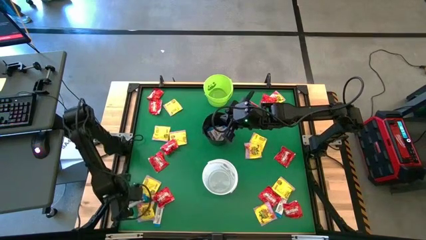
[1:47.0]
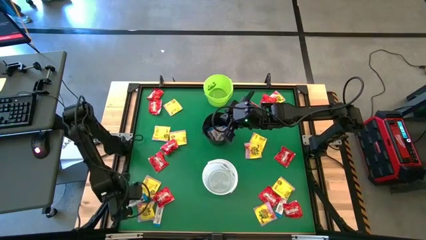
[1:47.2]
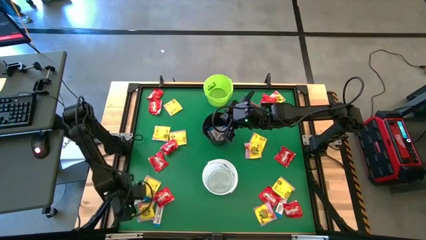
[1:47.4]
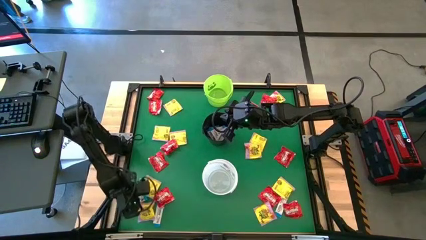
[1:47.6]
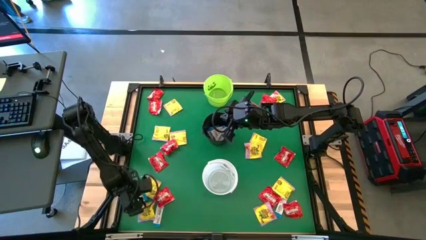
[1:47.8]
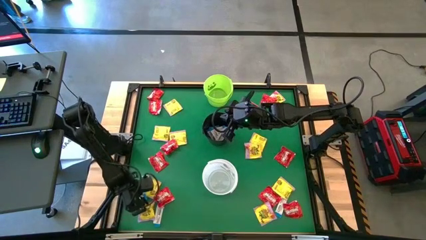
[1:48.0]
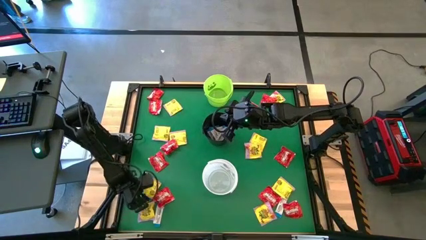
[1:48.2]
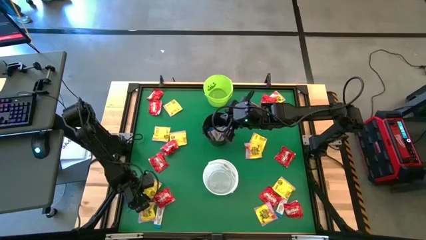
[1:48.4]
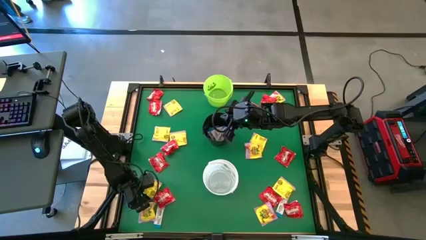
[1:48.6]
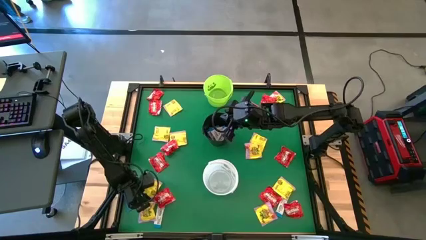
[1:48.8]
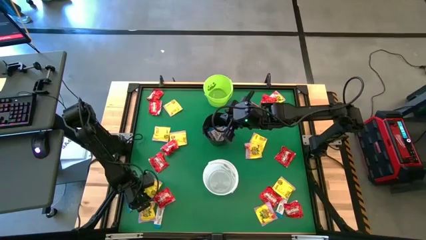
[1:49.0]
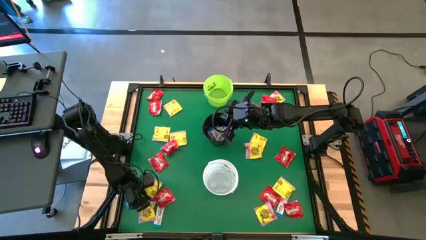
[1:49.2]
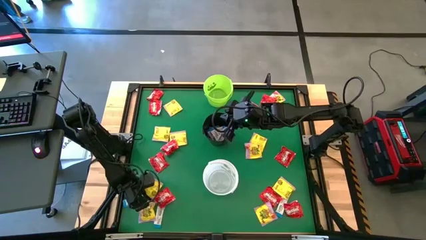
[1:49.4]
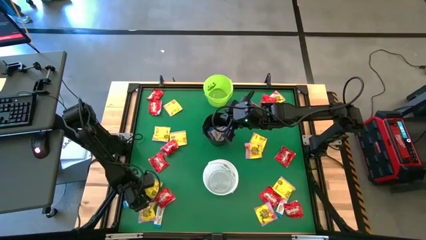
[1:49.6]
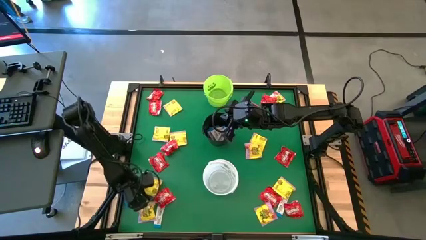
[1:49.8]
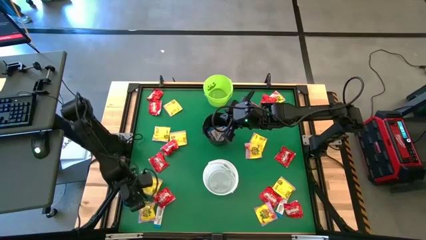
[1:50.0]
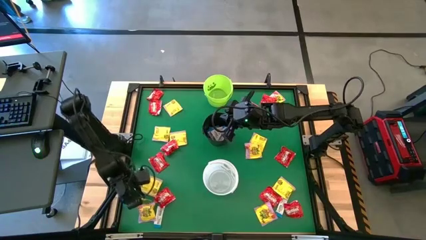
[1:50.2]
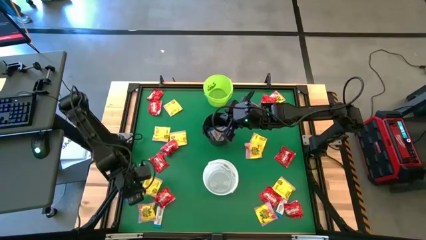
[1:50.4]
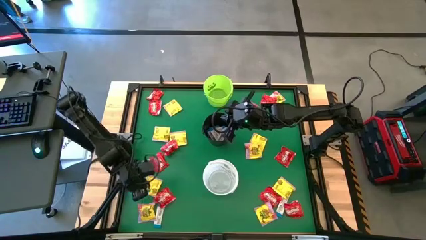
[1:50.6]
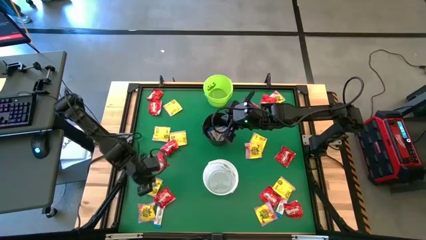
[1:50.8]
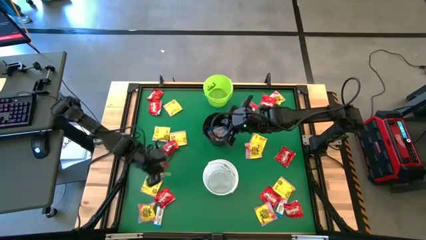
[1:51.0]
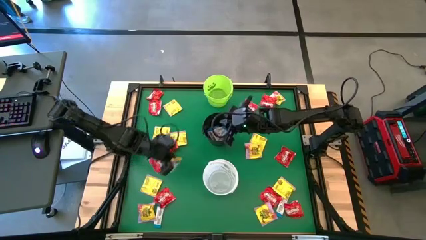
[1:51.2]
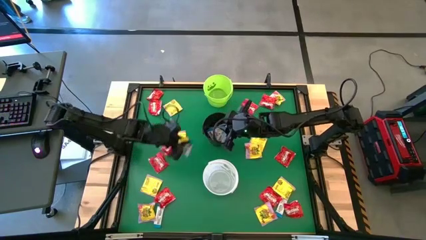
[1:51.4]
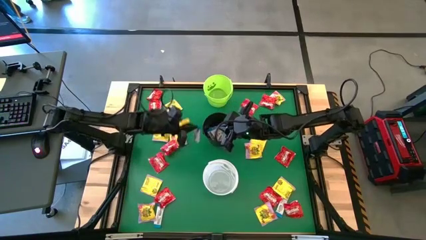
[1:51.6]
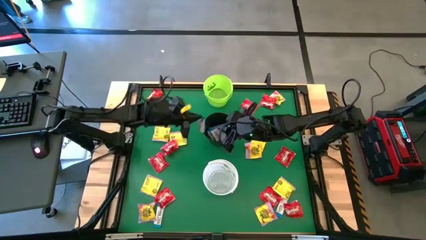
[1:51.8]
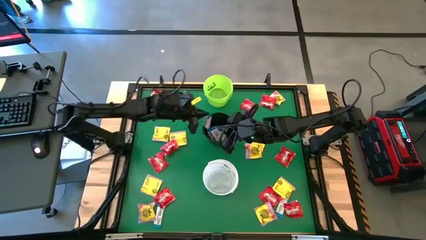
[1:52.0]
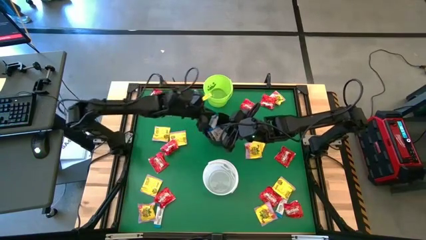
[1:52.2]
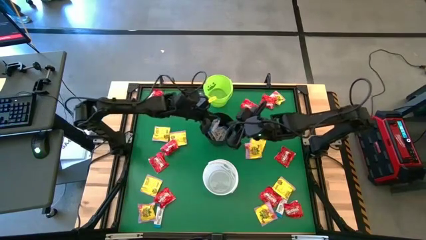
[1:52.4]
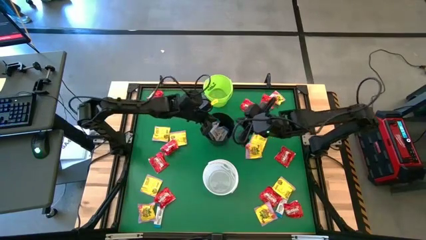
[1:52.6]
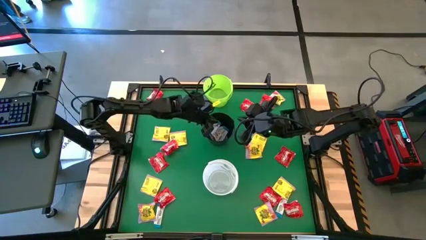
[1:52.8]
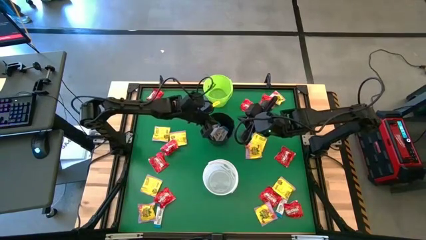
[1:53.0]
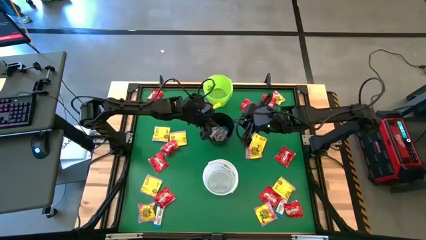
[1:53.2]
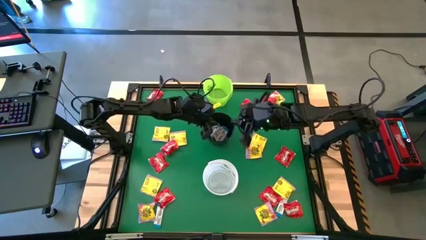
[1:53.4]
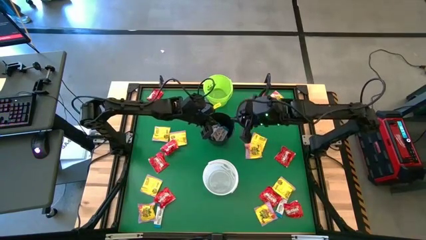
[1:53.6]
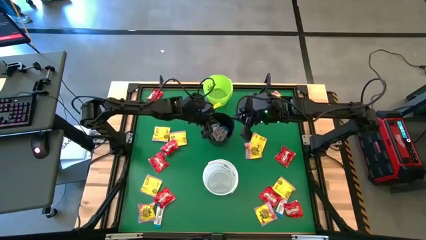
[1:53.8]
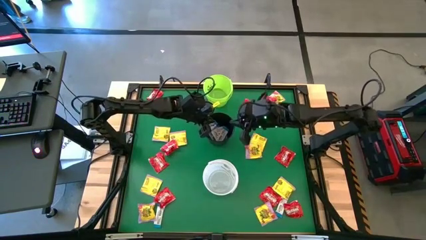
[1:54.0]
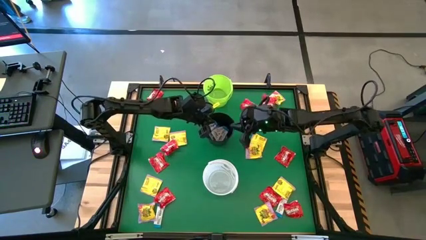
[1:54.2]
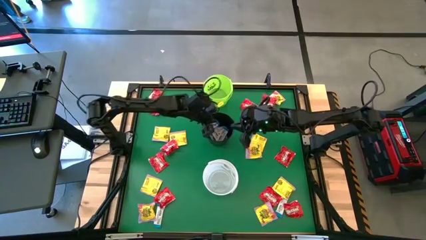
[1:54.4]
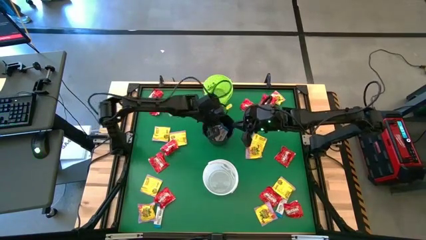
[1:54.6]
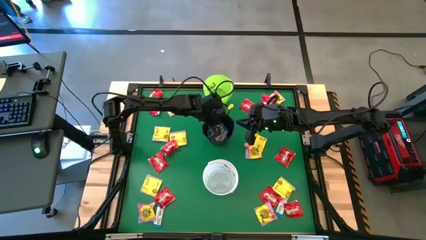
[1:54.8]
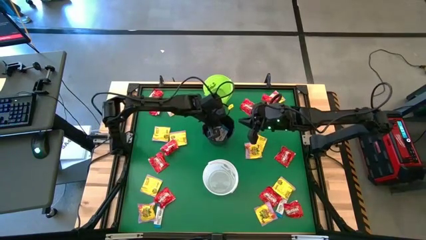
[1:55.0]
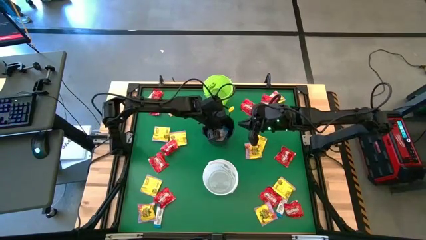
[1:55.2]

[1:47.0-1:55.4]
Task: Sort candy by brand, put in halloween buckets
Put the white chocolate into the black bucket

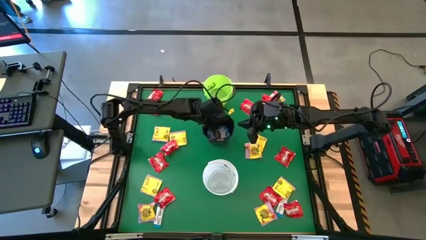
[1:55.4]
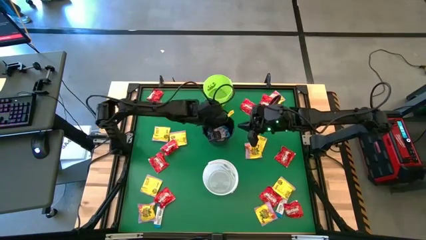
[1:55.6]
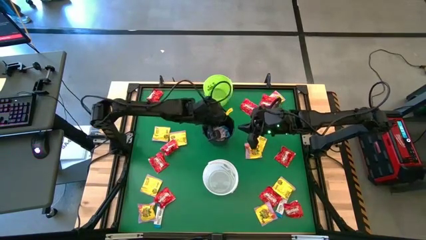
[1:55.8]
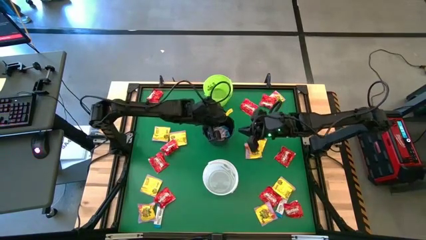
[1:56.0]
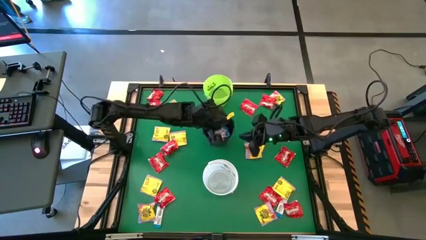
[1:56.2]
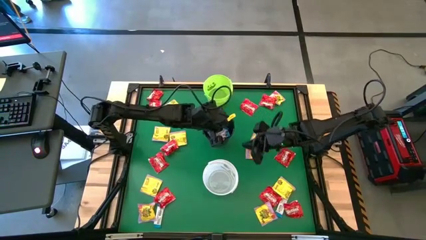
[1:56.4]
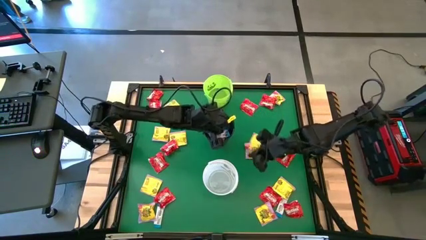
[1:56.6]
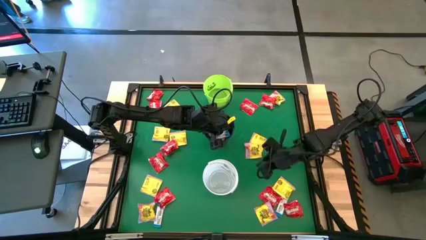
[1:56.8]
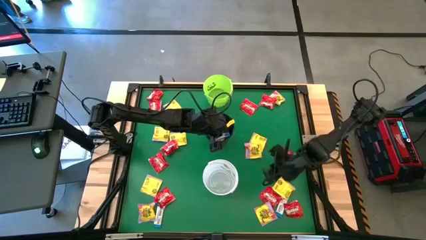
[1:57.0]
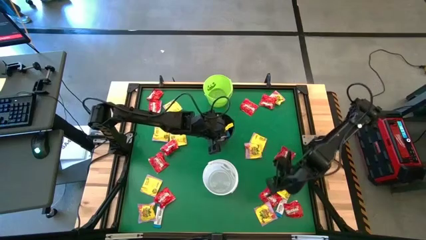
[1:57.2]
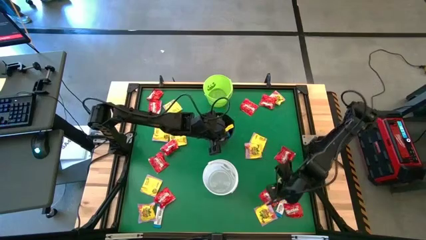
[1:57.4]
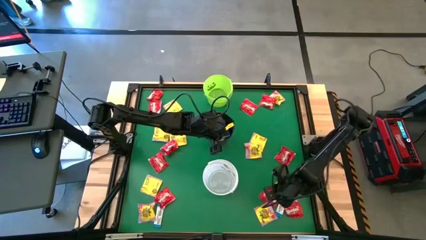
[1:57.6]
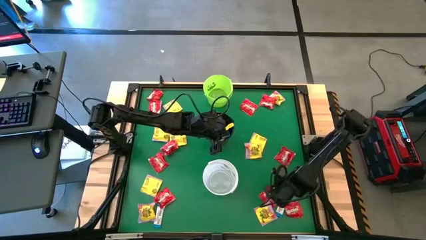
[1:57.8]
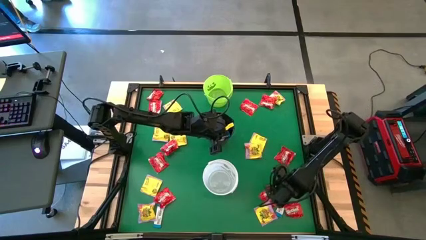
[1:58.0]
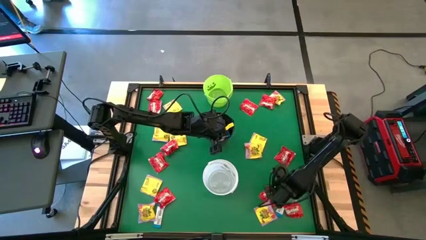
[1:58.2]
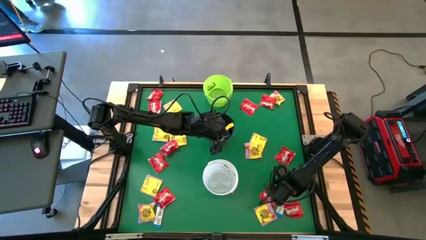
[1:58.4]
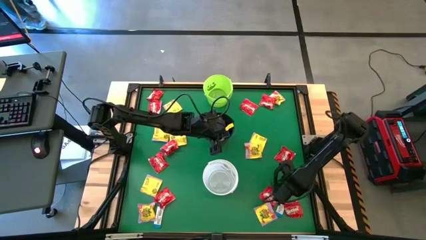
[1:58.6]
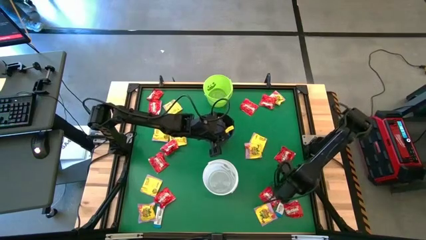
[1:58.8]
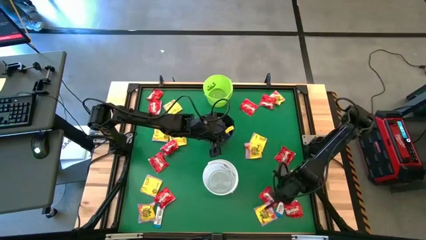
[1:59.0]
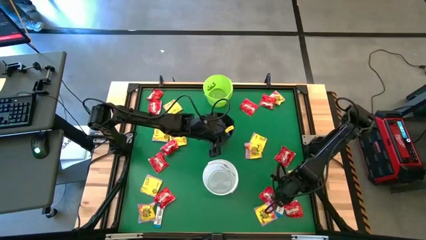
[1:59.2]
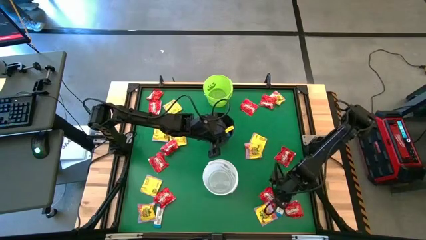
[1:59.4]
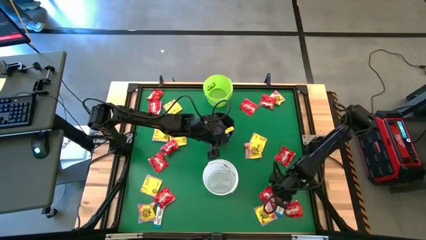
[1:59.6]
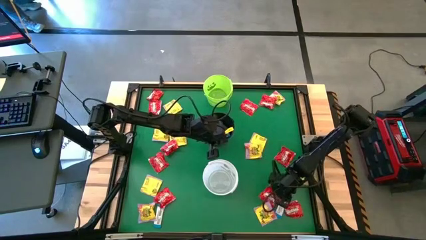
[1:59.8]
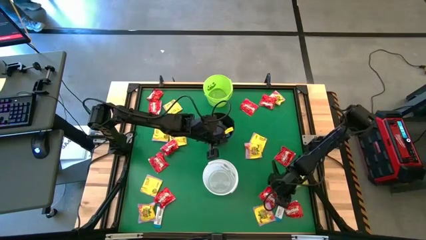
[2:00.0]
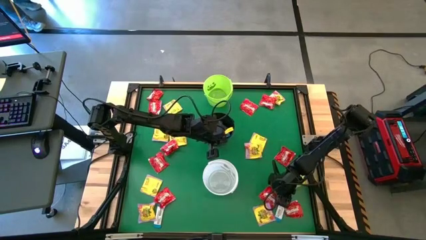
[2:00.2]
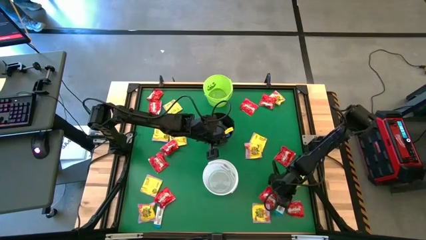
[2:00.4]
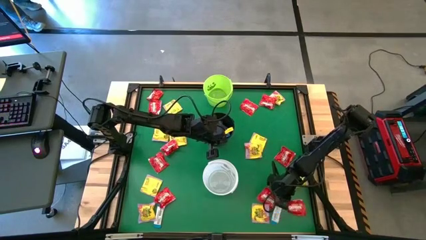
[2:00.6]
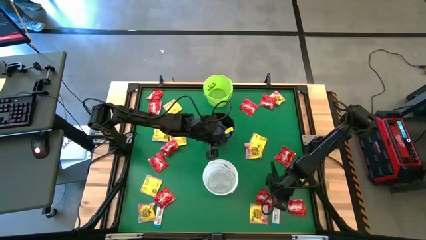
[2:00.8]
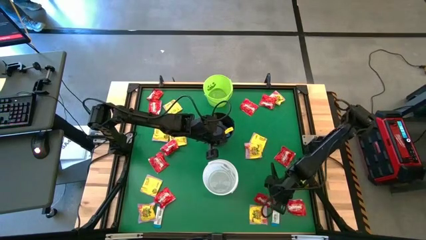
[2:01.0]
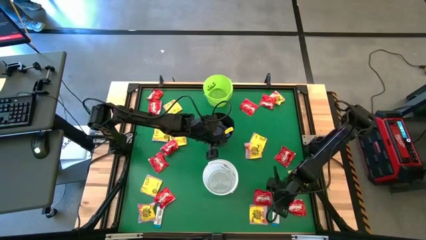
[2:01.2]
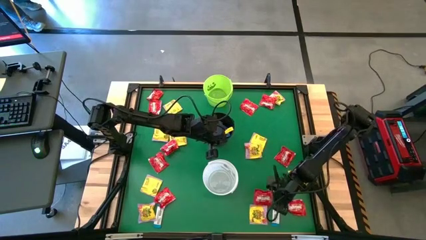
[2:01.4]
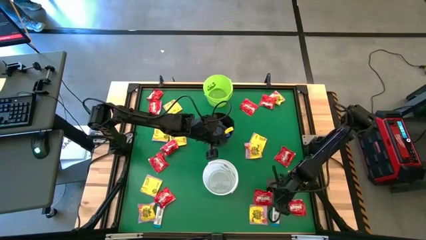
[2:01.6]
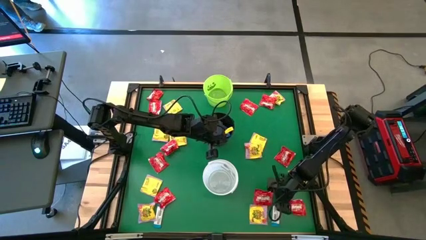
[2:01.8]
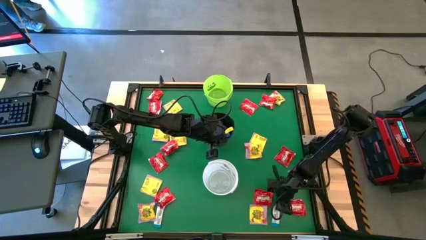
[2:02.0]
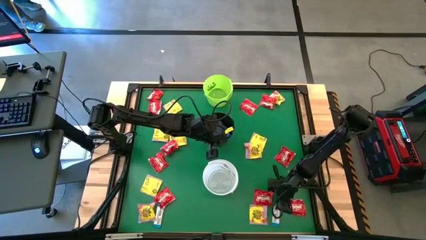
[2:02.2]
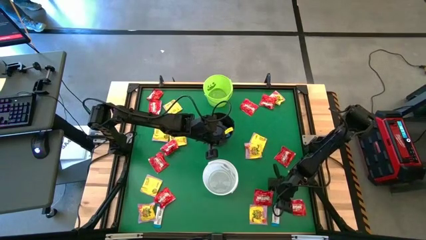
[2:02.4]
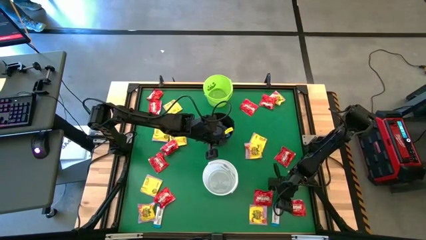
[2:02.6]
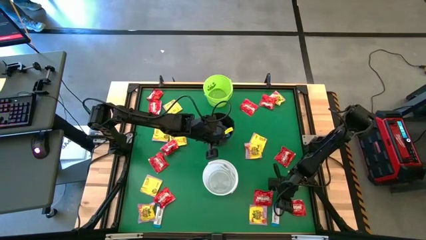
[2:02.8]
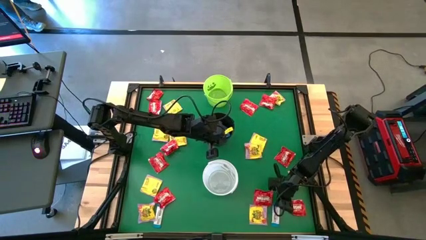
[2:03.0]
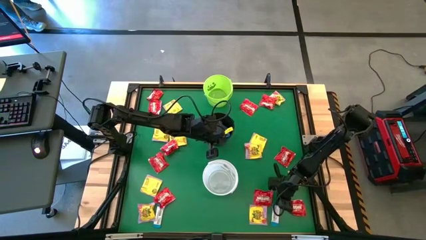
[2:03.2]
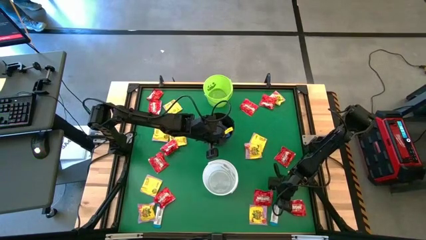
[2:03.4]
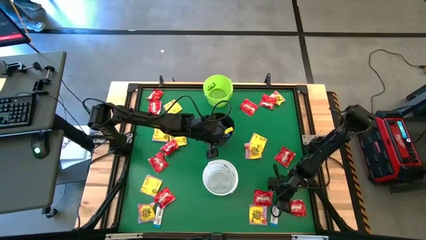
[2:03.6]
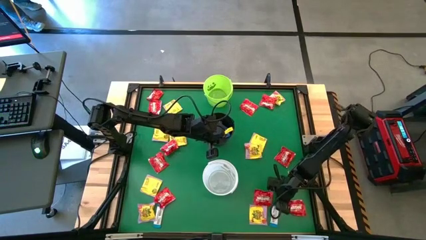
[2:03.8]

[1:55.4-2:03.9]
Put the white chocolate into the black bucket
